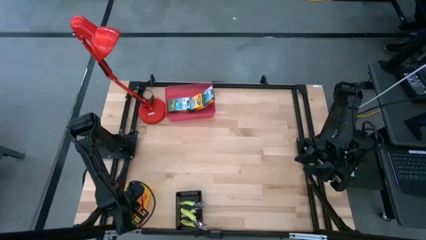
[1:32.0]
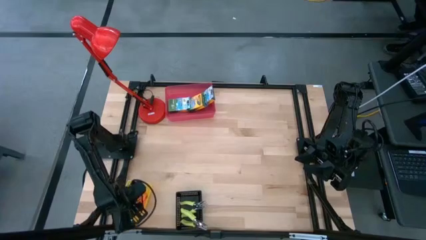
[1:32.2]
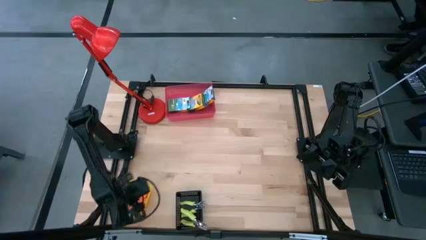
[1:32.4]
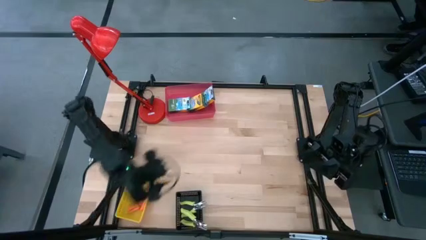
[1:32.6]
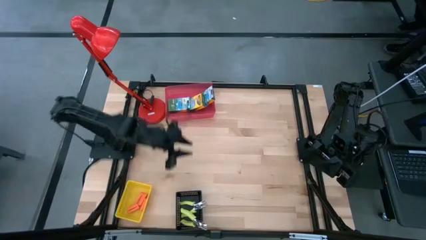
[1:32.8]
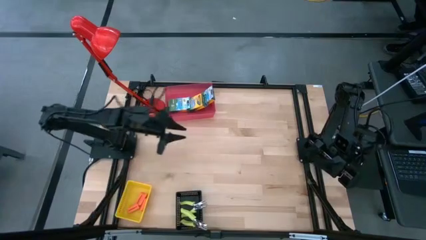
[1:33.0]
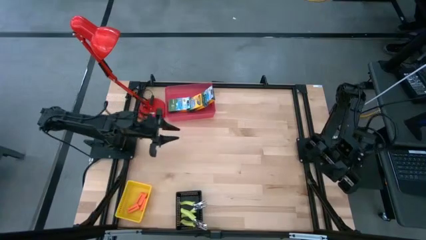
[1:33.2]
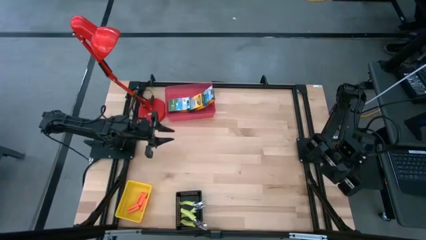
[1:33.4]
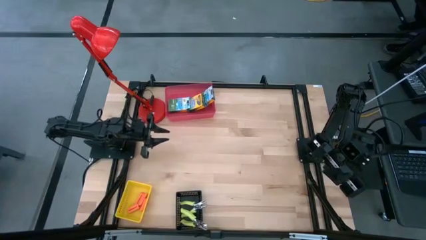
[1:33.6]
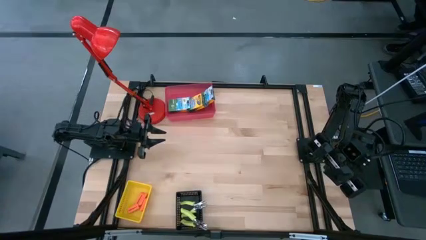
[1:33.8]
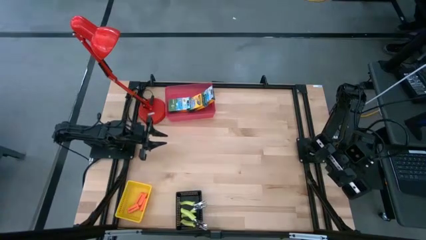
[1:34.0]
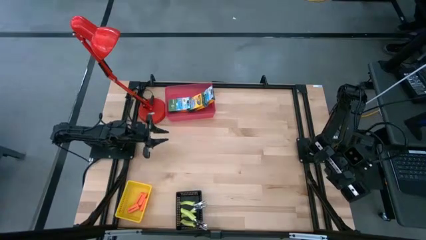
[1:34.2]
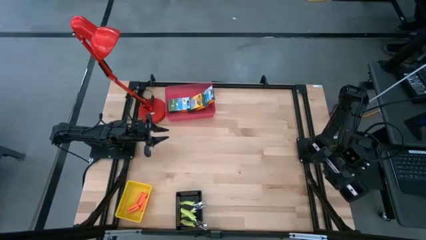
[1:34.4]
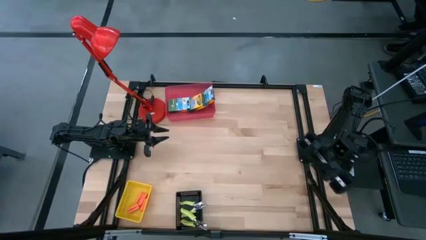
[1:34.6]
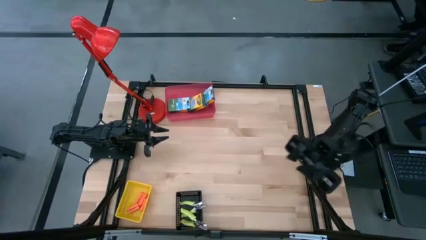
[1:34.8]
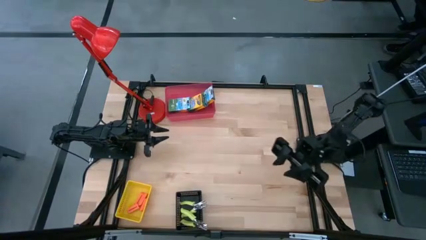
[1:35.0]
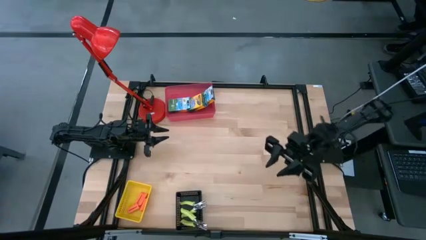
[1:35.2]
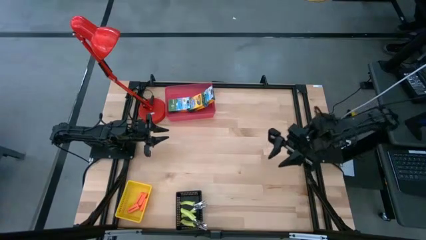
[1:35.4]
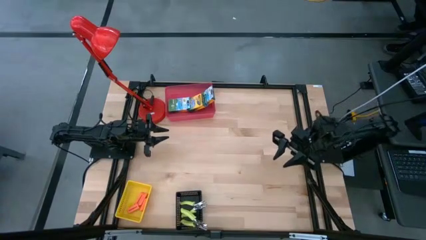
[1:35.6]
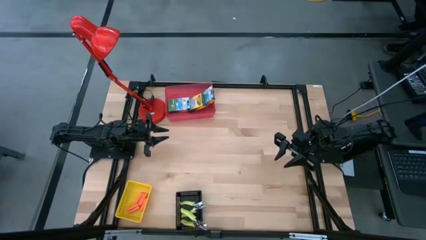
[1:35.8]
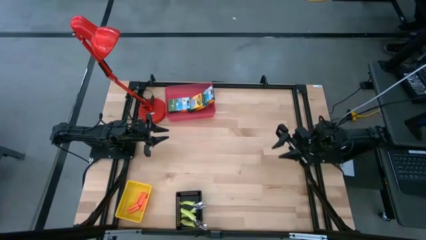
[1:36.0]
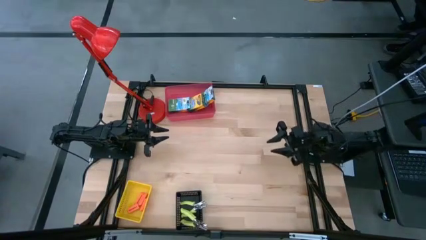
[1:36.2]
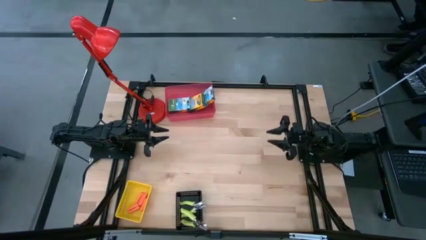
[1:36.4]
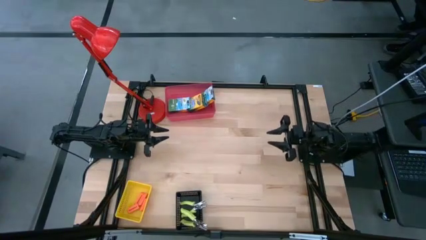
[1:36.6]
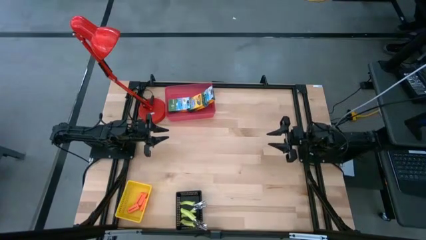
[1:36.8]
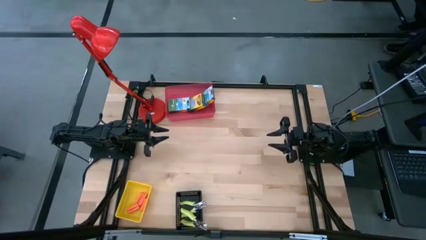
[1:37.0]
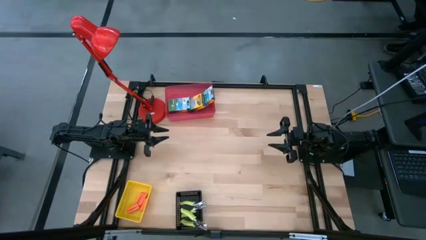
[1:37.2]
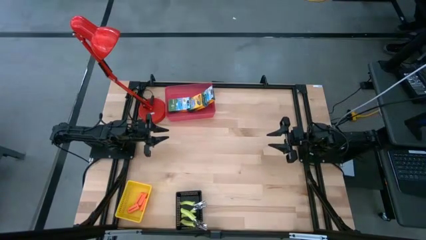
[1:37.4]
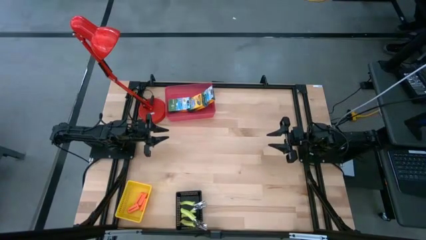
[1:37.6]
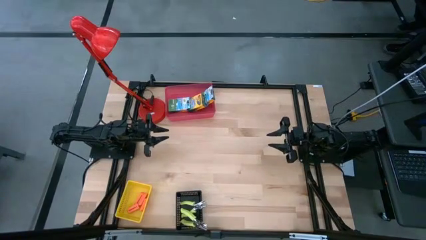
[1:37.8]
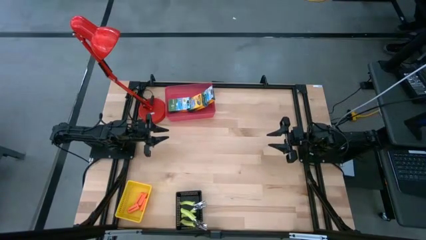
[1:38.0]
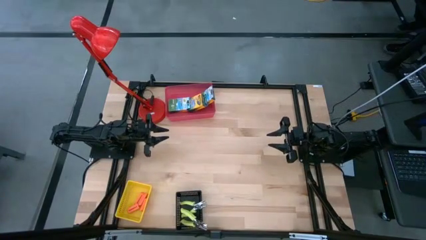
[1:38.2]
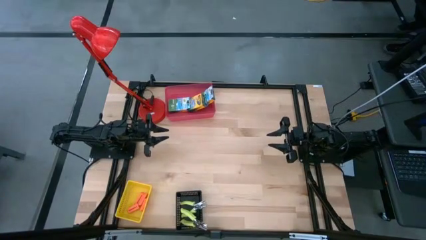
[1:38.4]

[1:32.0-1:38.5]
Task: Pick & Place School Supplies
Return to Home Position

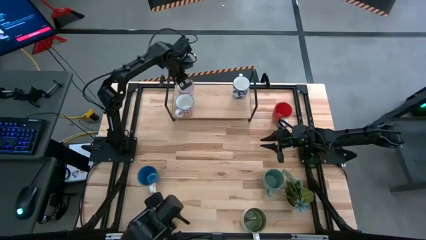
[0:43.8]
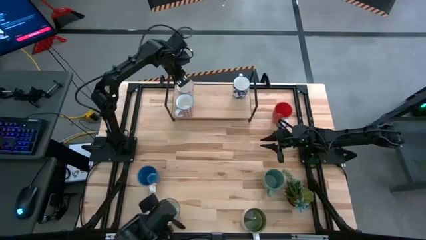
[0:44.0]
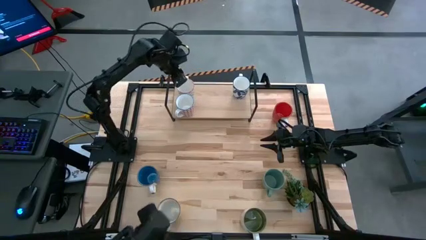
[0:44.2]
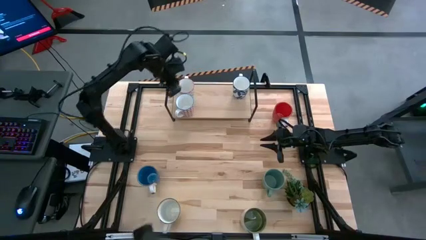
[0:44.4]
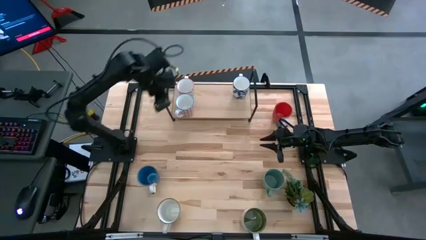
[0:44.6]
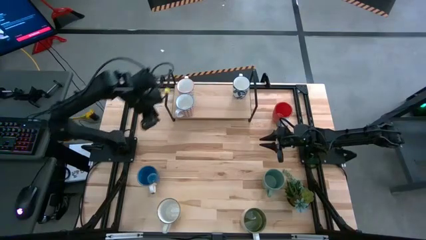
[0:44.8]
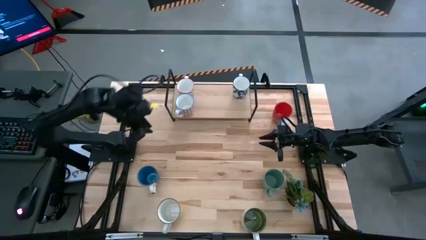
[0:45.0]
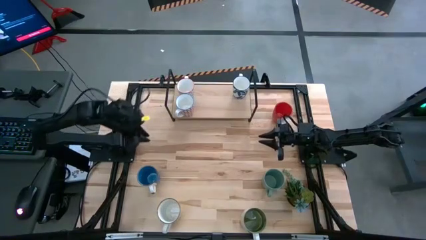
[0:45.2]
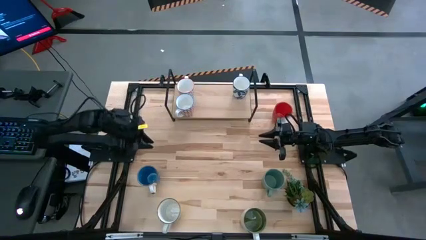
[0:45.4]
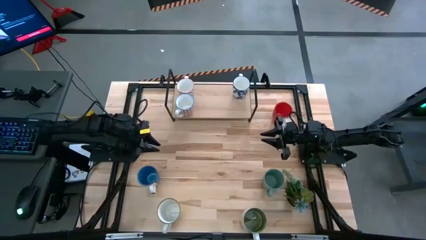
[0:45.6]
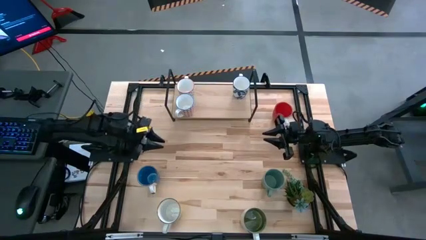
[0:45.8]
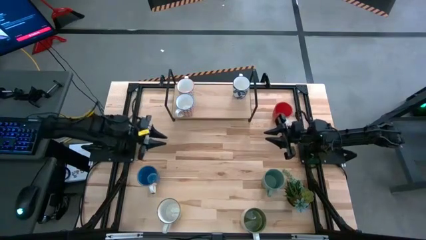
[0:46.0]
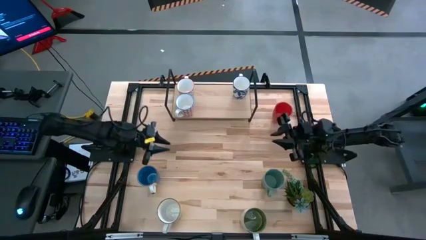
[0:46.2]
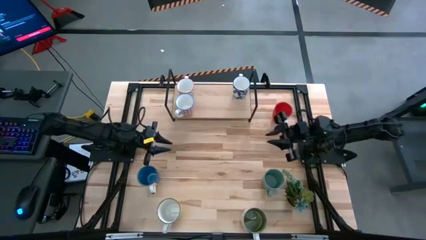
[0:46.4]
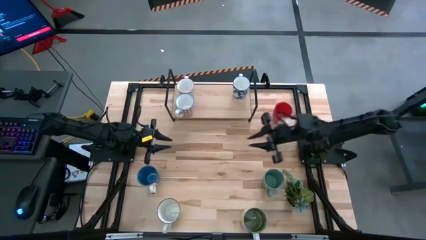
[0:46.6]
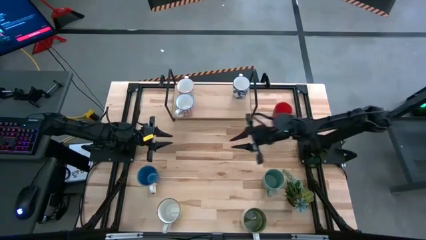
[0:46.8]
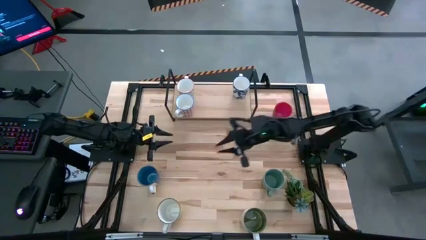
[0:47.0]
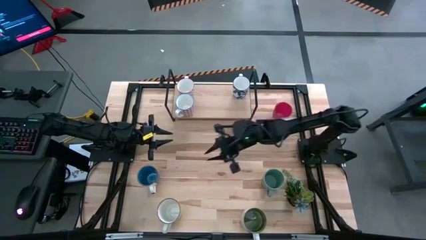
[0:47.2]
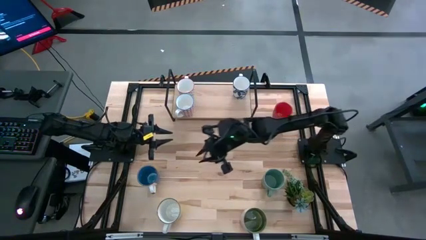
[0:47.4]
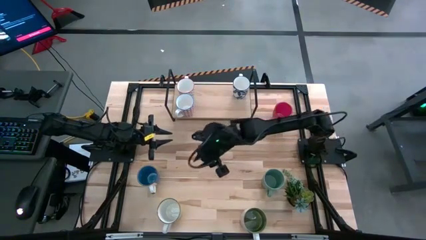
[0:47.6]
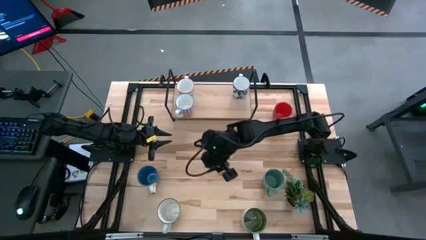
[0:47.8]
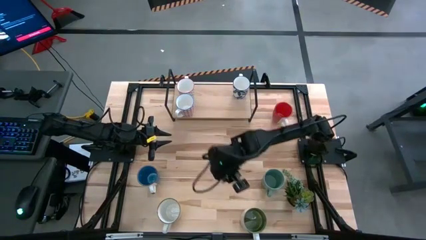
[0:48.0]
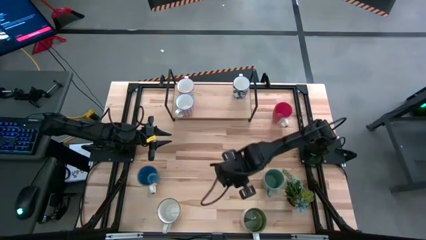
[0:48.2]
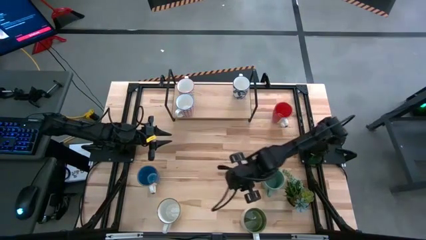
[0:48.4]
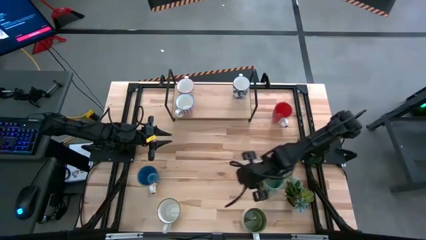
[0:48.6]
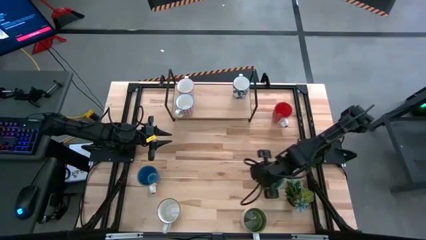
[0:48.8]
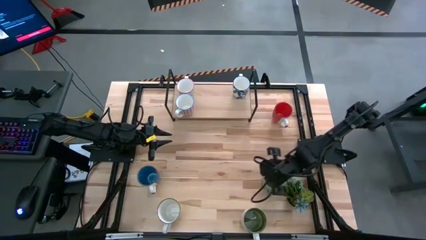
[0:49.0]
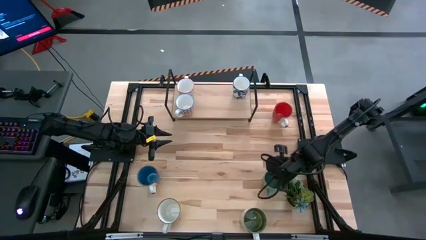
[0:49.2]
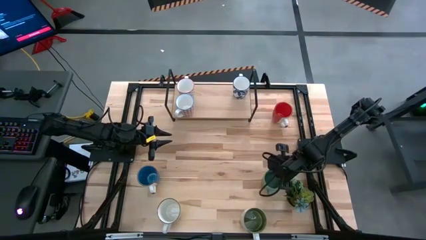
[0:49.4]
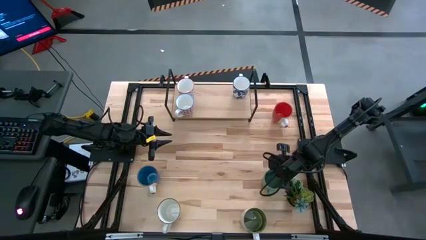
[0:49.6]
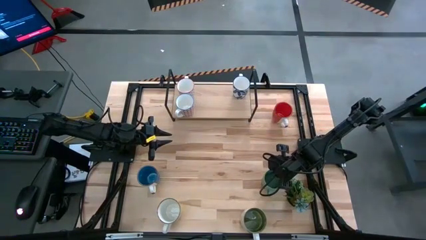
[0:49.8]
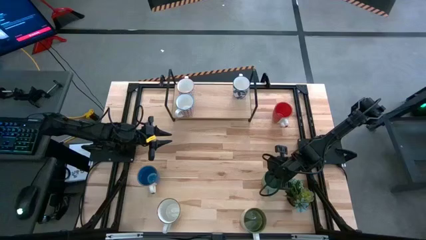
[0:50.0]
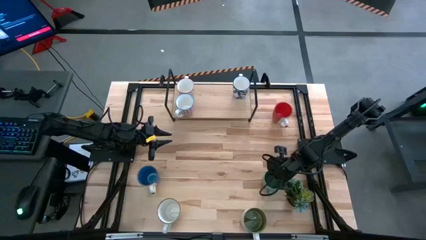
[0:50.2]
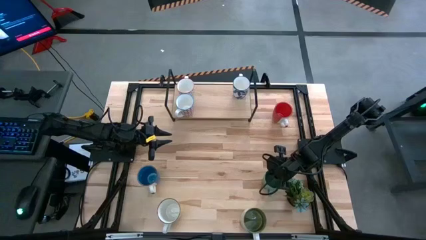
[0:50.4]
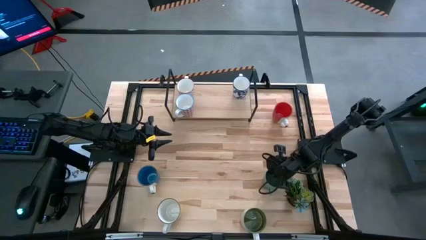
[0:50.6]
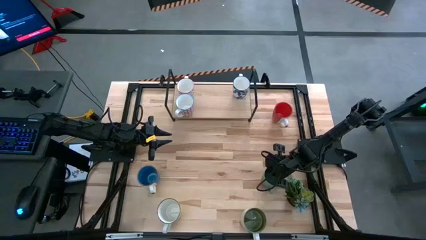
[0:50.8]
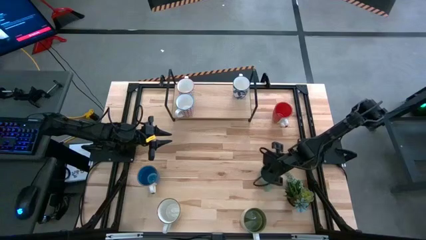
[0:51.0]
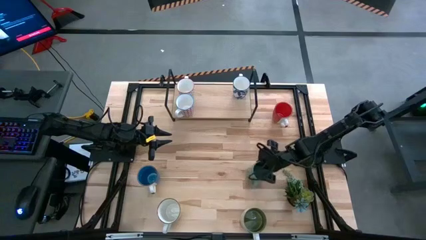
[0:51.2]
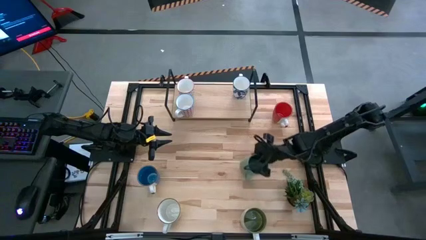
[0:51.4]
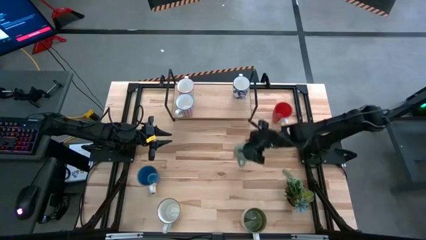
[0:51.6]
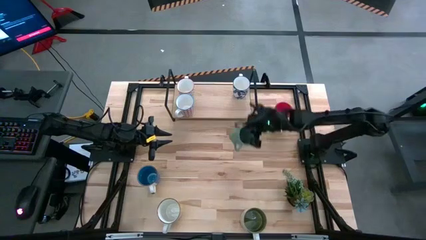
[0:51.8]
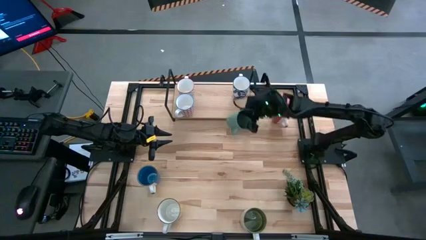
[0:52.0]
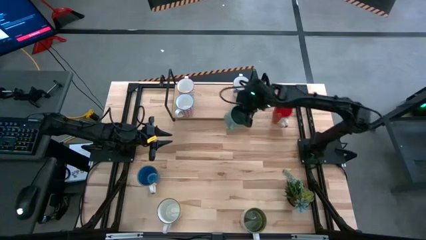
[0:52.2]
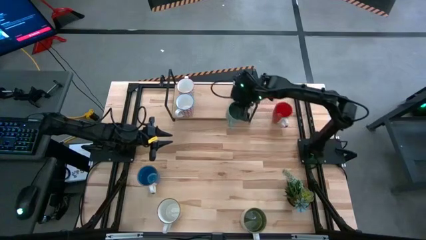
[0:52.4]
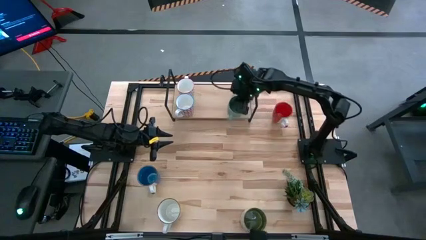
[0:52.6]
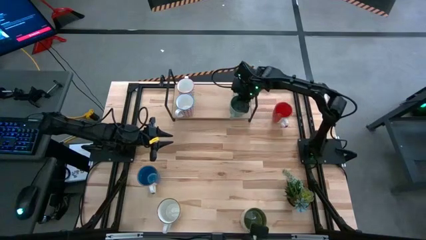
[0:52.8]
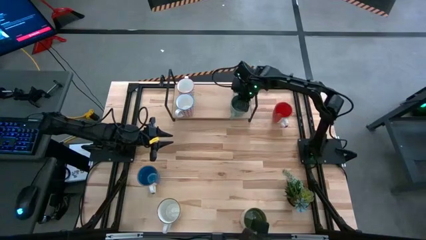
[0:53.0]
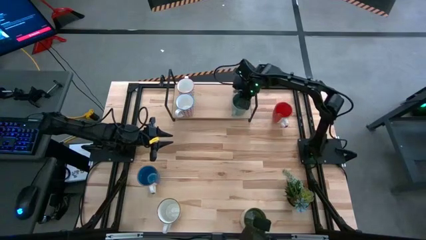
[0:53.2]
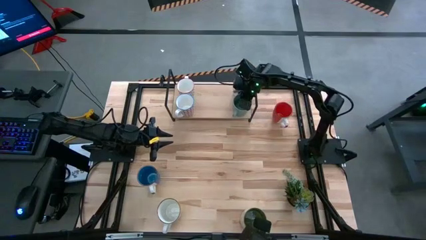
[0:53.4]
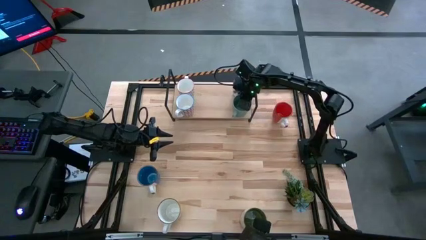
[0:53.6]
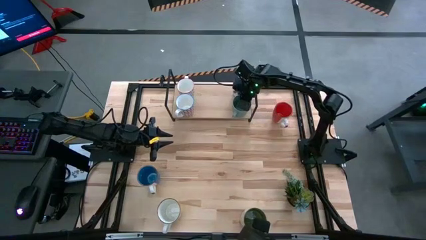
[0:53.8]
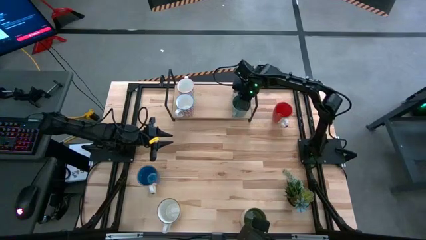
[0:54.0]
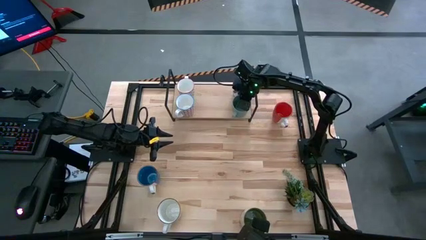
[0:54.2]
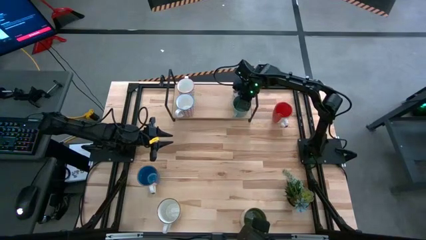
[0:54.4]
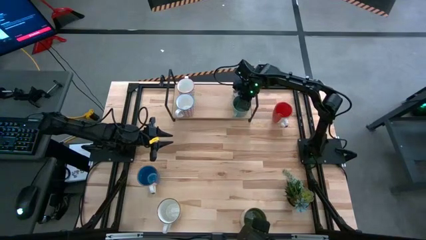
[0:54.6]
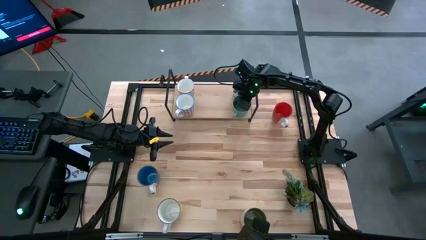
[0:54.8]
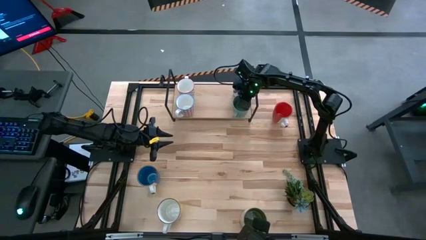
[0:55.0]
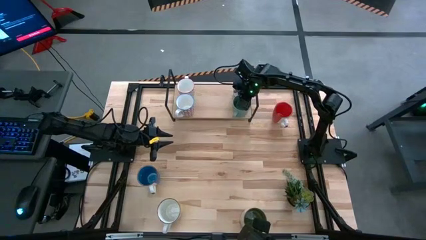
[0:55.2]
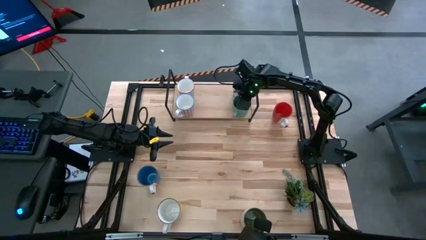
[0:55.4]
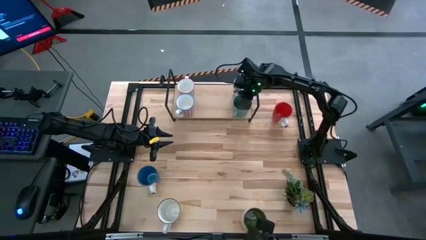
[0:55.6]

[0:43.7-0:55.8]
Task: Place coffee mugs
Put the light green mug on the shelf
